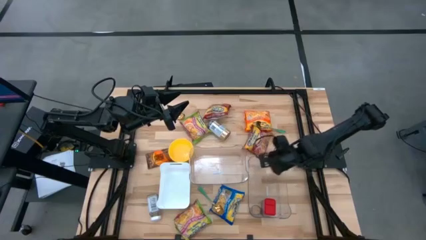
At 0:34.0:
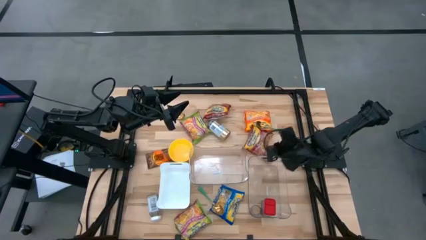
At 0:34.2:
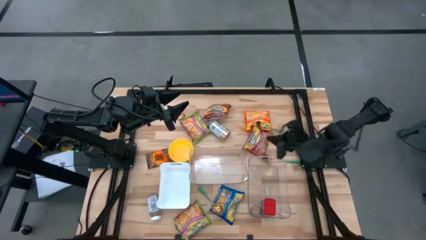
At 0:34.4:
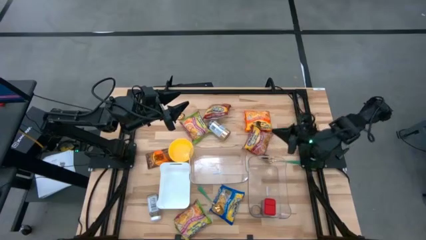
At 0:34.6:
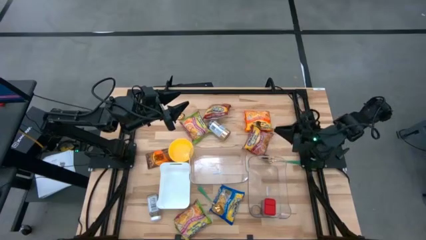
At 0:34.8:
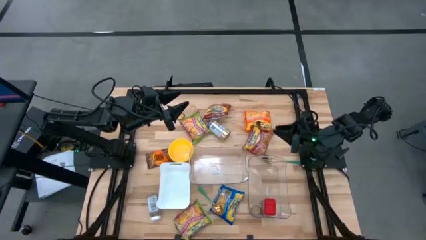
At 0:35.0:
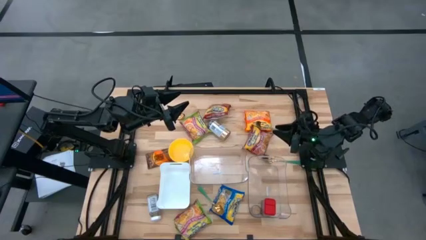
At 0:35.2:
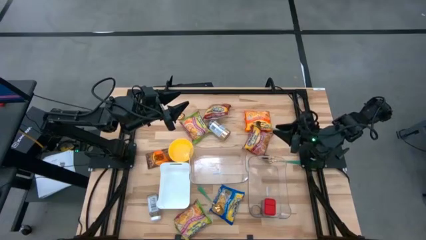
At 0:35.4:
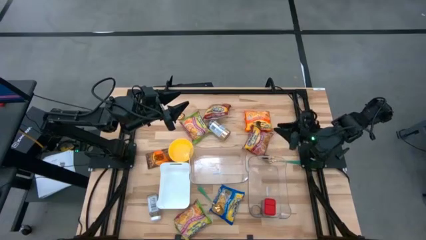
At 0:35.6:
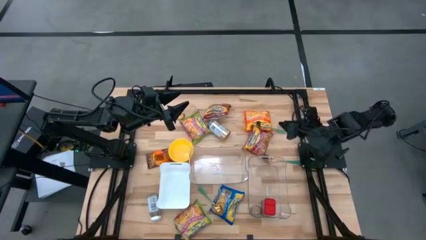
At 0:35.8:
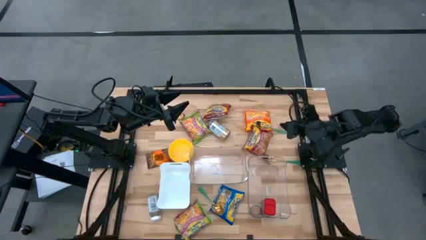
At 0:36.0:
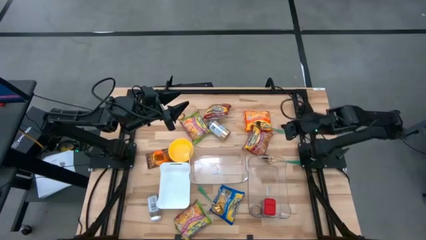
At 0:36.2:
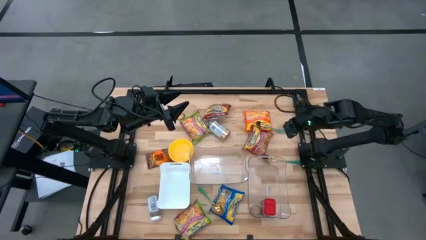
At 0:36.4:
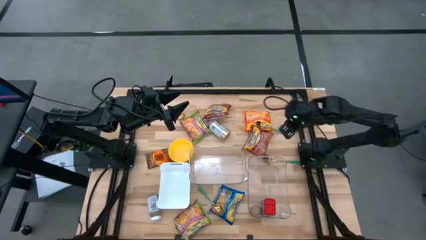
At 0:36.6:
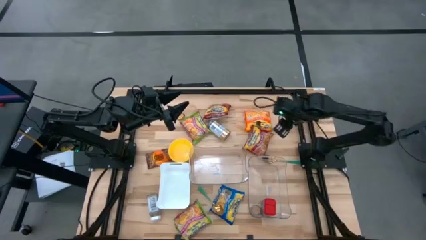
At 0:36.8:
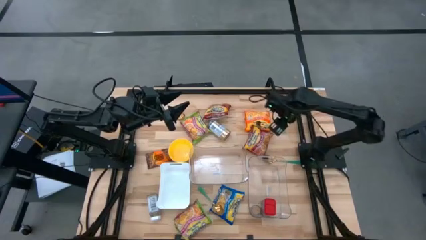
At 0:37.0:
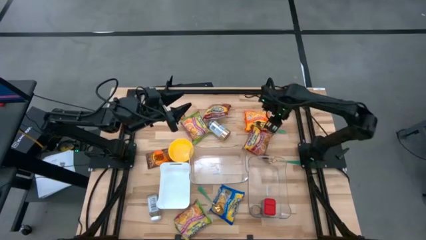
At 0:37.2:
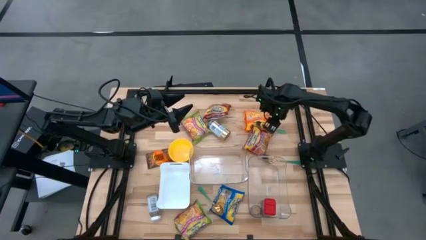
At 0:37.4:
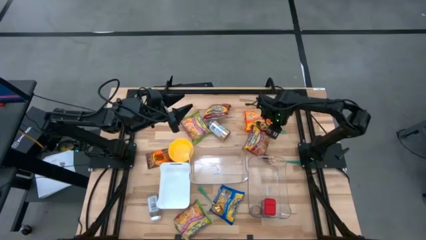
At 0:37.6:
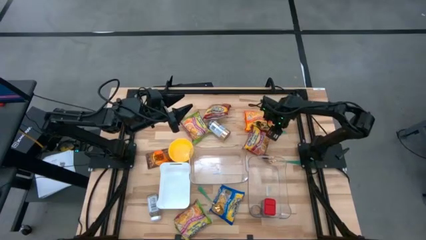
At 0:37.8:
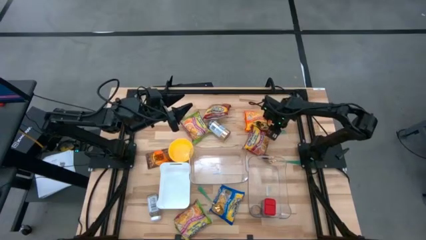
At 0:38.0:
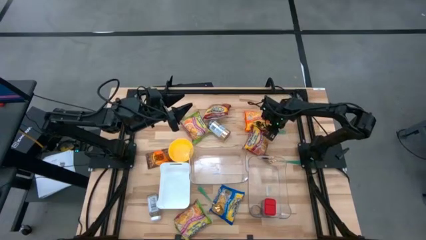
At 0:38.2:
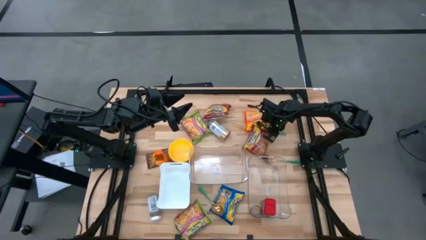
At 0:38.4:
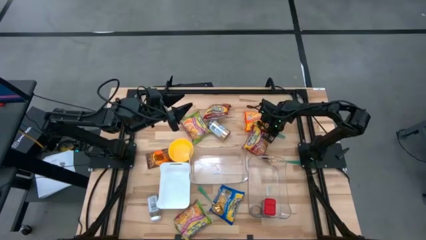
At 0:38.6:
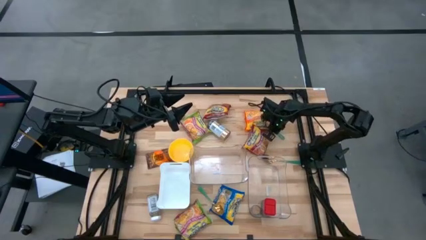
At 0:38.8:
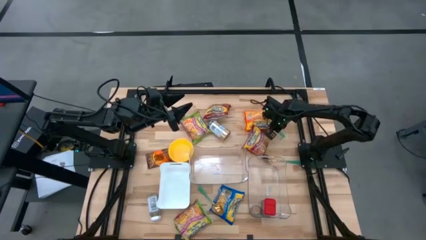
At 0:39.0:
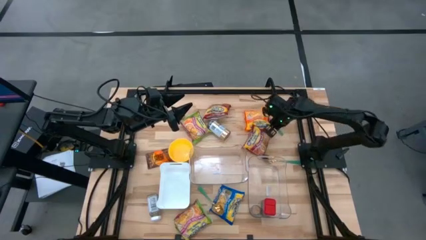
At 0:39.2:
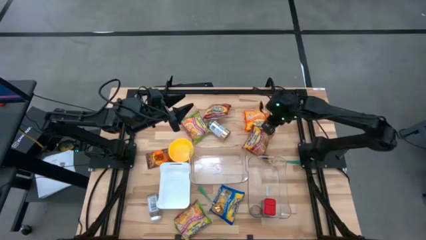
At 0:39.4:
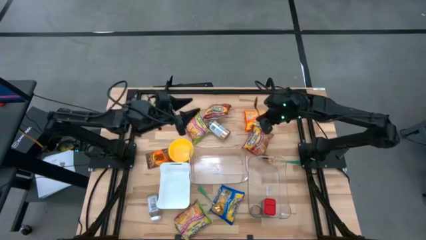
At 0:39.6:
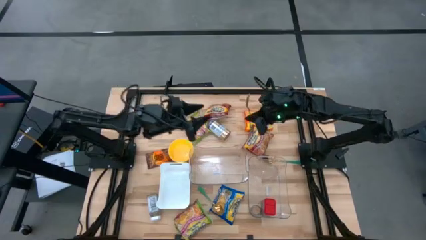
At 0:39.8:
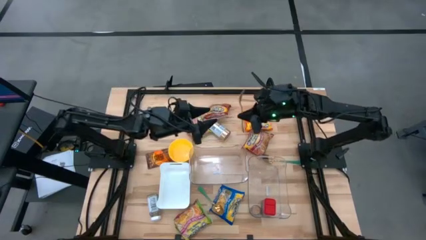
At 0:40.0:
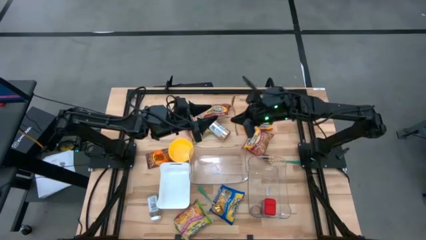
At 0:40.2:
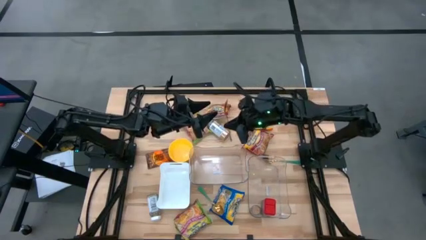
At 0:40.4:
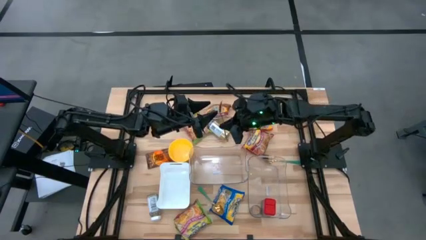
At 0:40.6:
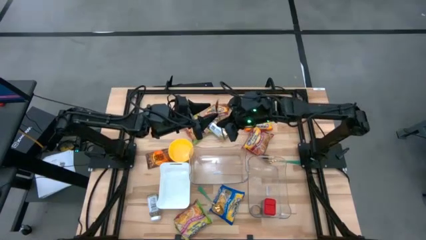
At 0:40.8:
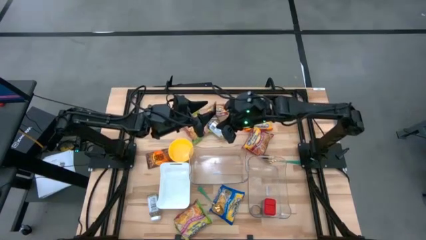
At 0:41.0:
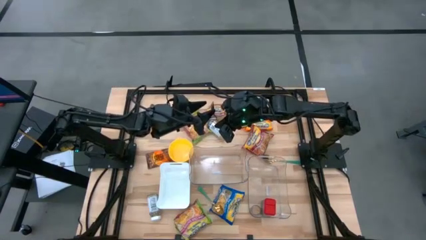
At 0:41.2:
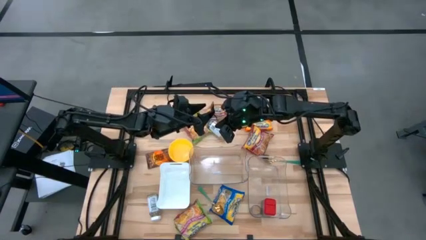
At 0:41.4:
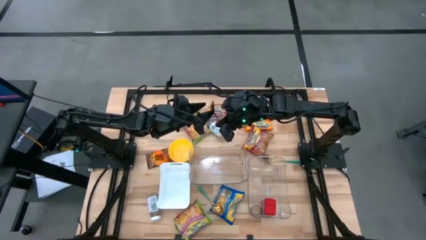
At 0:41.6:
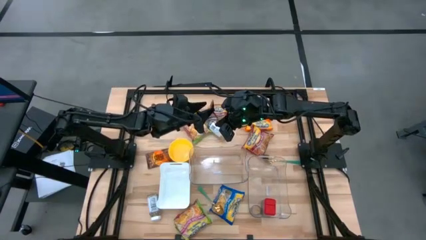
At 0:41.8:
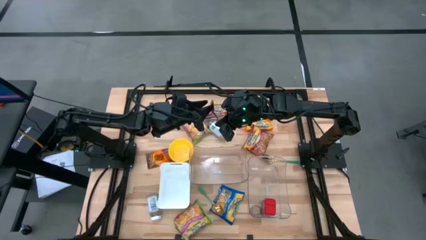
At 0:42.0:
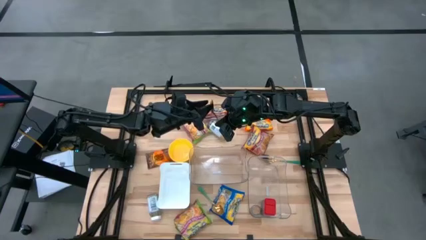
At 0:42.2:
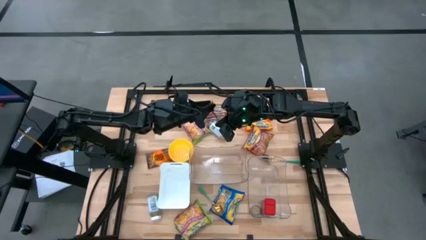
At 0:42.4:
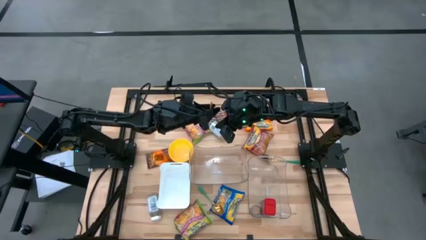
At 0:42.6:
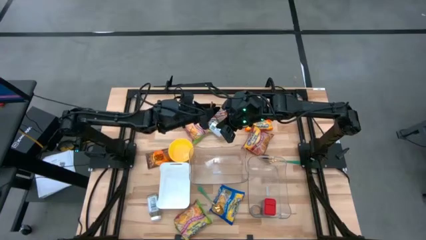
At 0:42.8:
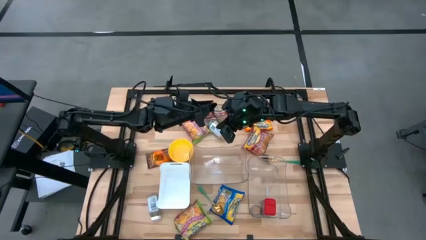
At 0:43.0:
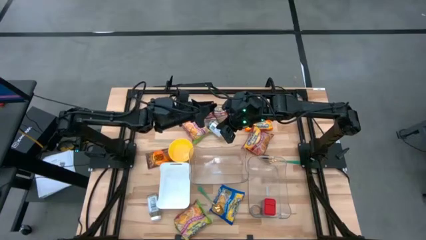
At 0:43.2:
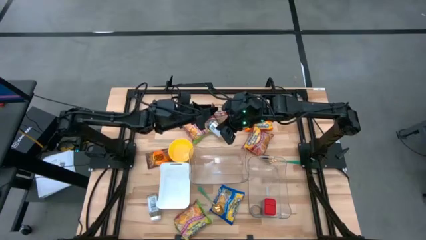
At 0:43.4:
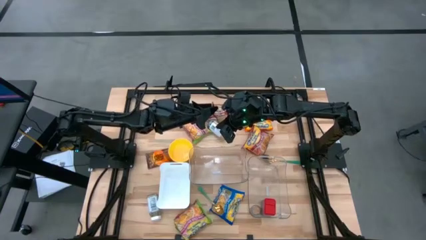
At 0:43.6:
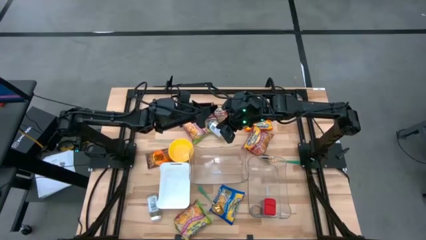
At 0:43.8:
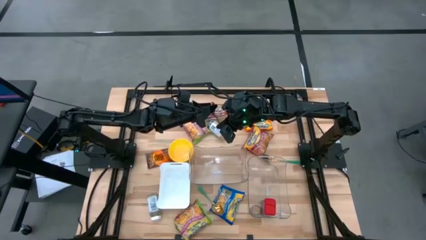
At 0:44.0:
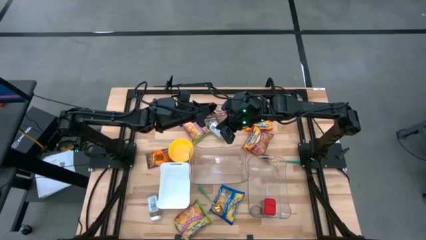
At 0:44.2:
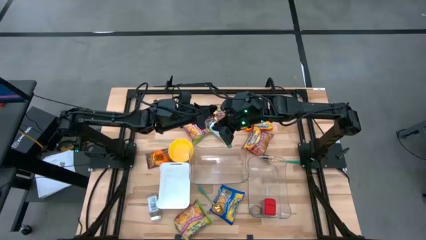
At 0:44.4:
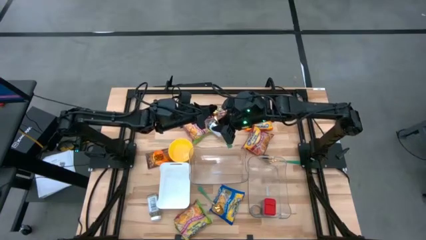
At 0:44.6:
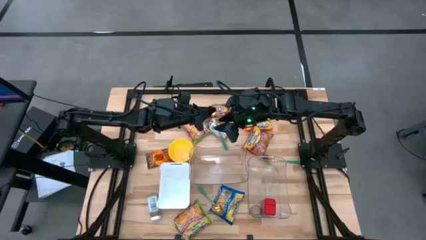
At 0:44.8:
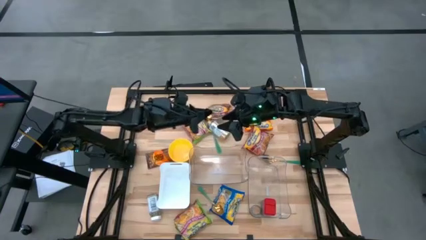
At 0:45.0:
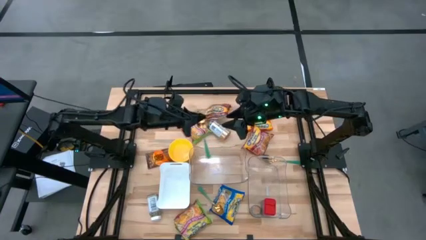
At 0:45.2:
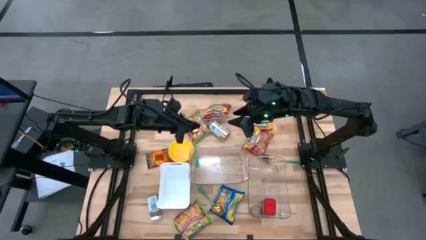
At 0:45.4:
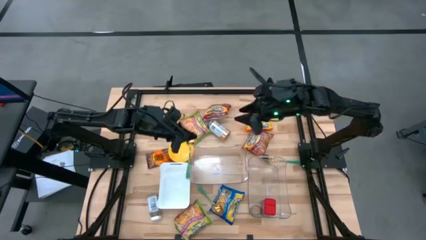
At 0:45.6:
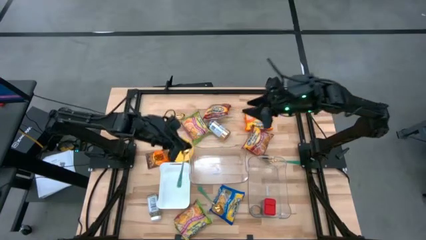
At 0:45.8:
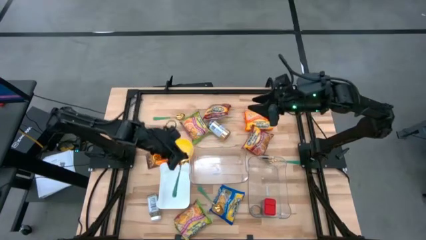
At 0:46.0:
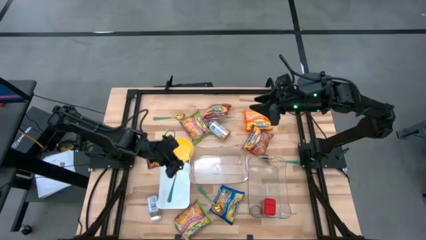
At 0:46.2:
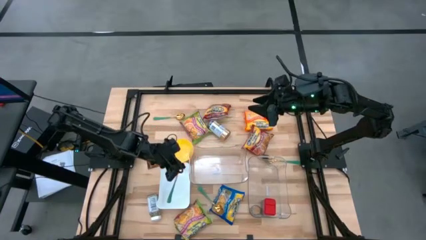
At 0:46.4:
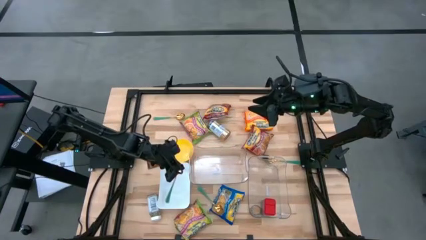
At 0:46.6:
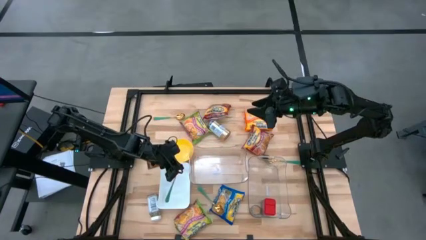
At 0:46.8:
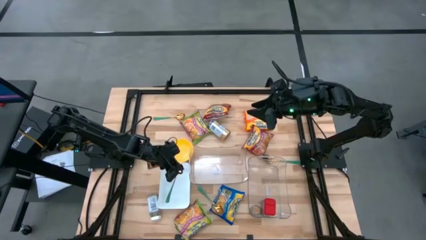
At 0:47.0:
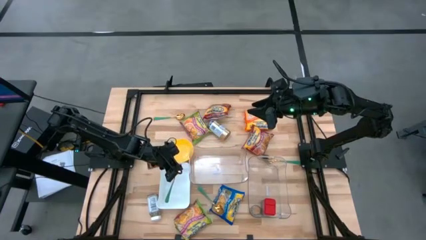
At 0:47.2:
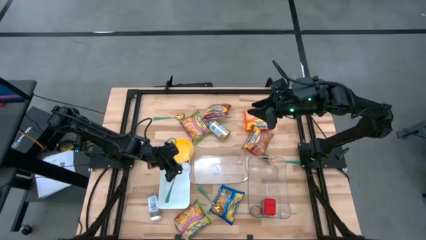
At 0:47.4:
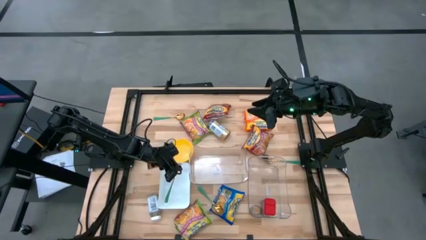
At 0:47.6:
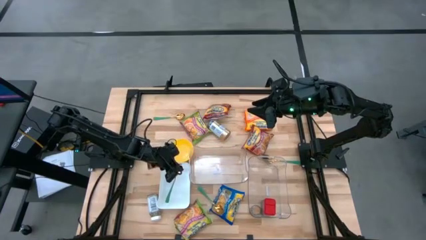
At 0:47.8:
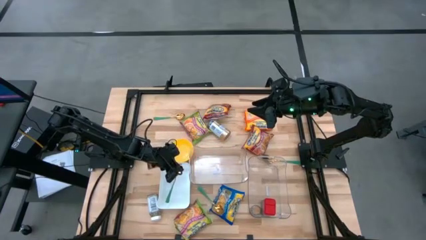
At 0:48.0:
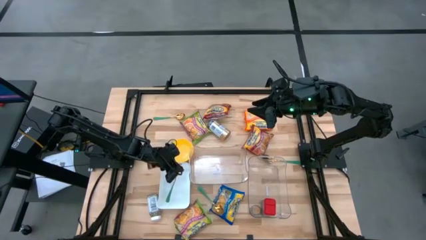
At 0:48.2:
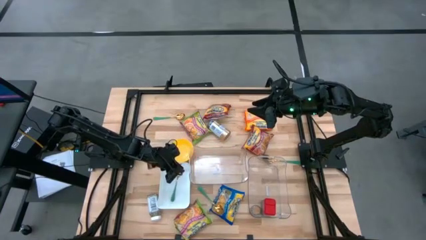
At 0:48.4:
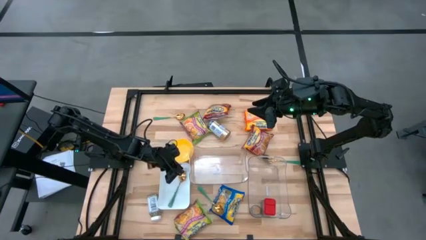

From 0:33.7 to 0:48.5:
Task: Pick & Place Food Item
Put the green spoon into the white bin
